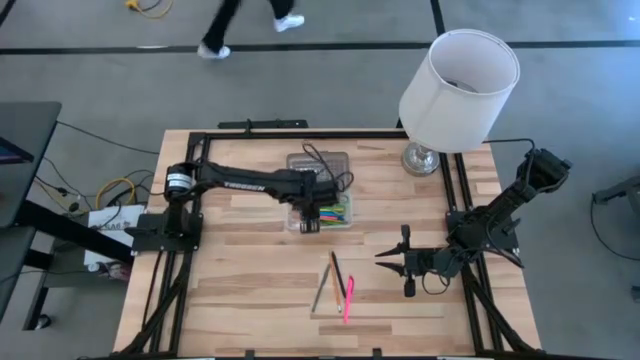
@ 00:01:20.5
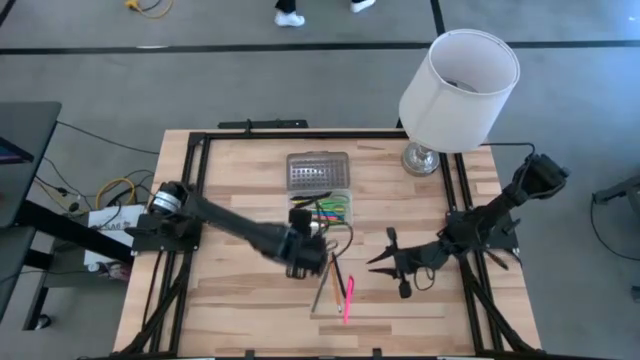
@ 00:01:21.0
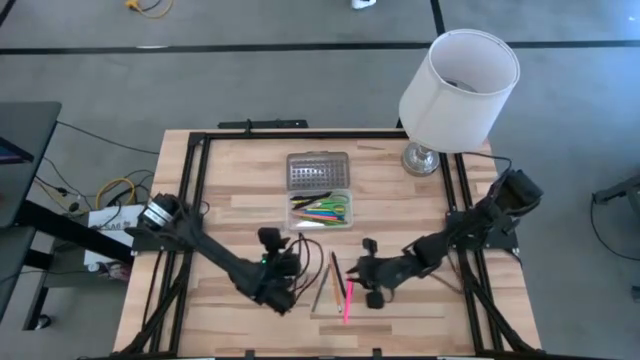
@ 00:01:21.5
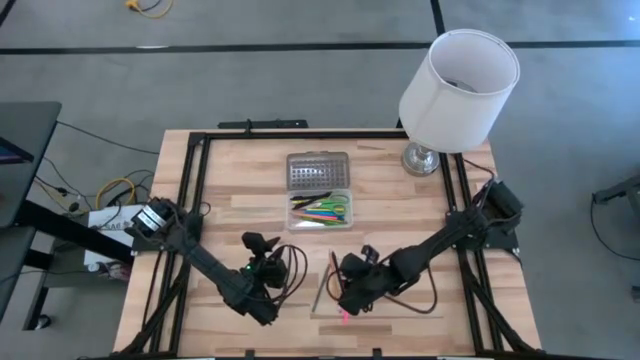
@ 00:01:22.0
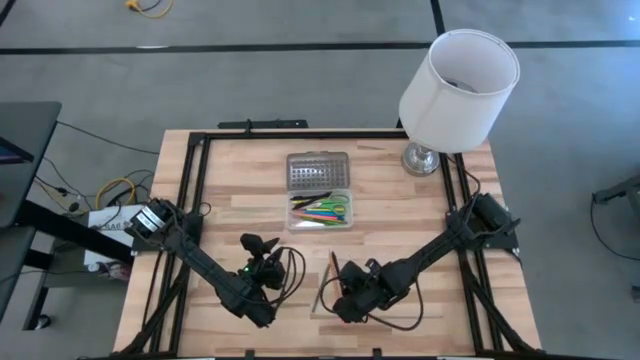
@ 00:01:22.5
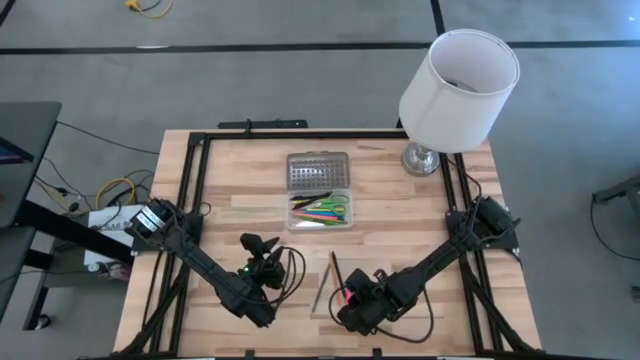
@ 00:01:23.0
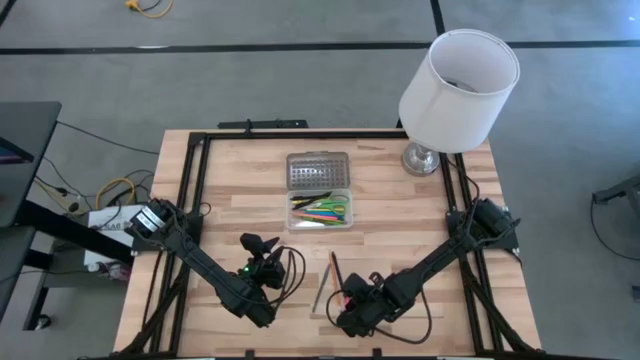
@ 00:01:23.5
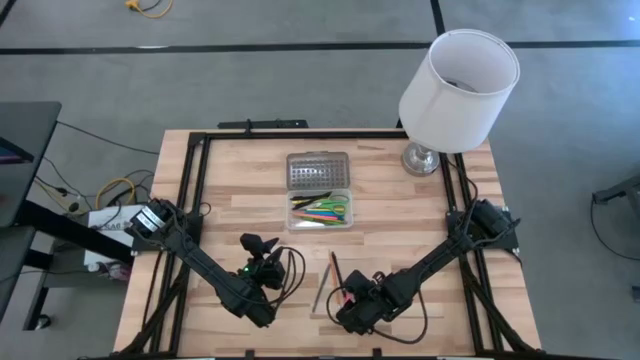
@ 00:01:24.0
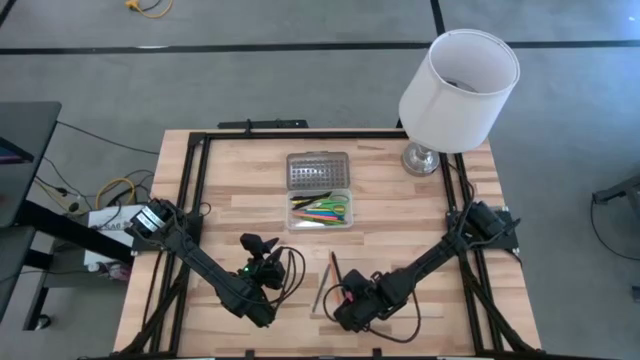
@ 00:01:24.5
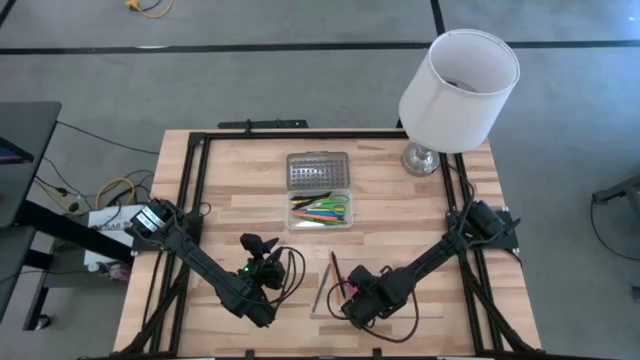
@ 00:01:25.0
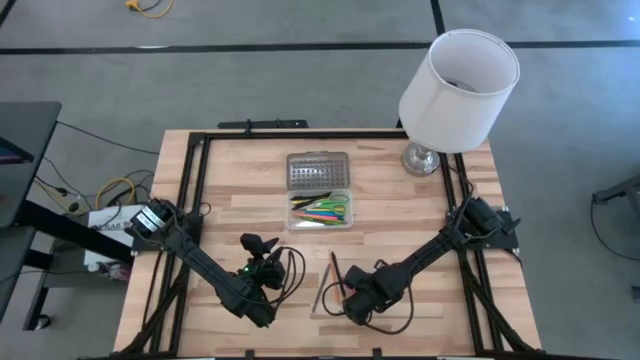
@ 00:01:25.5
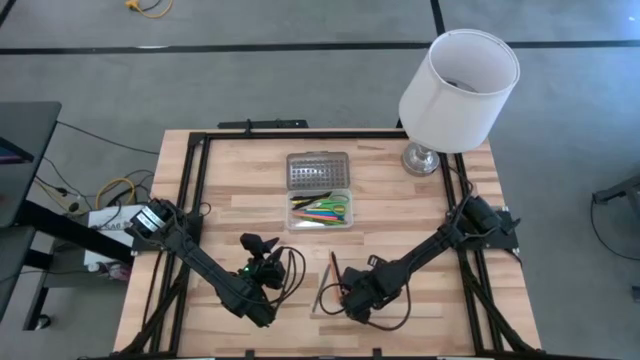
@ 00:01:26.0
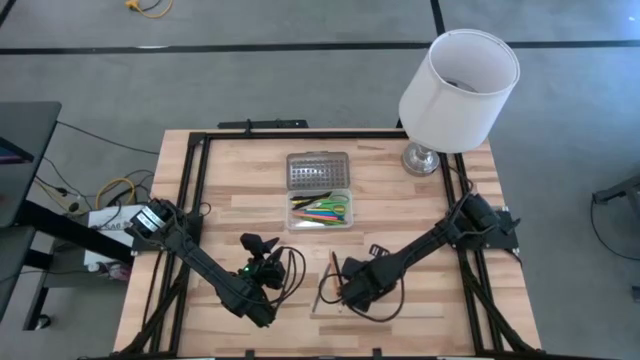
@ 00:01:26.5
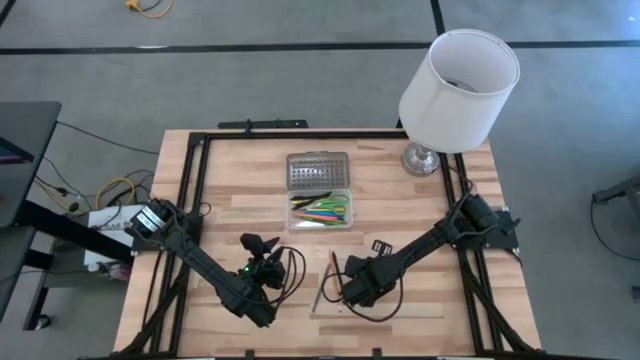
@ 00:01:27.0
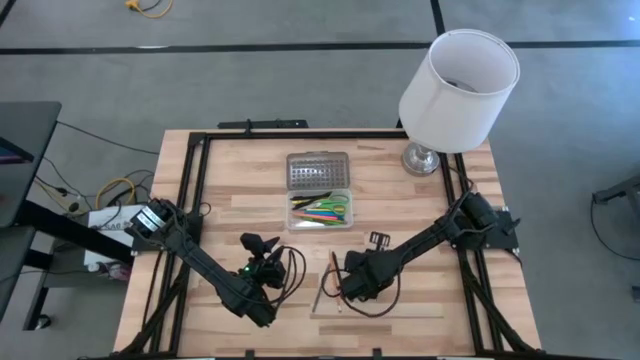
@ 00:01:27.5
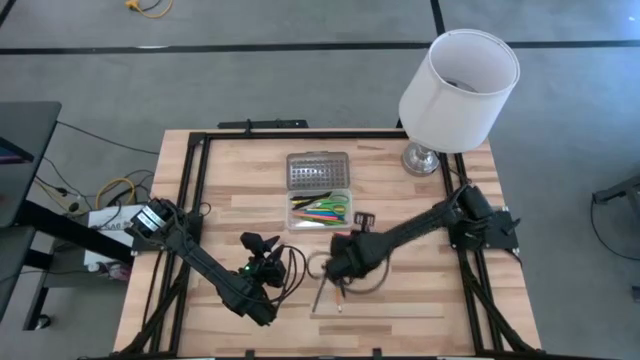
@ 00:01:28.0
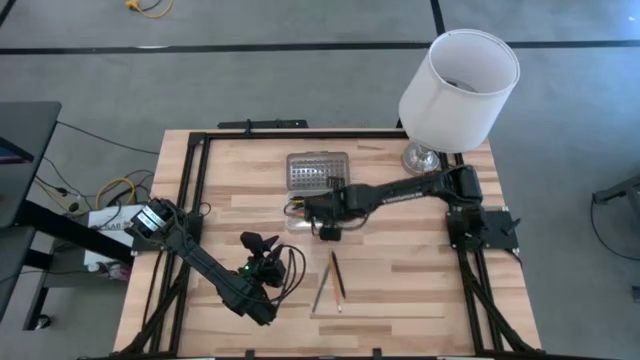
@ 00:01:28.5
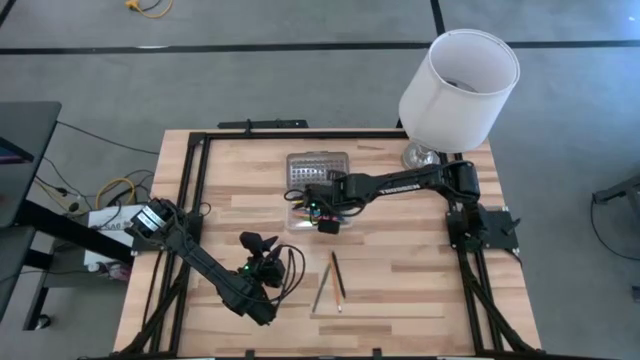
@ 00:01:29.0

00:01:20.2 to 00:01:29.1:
Task: Pick & place school supplies into a supply box
Put the pink pen into the black supply box

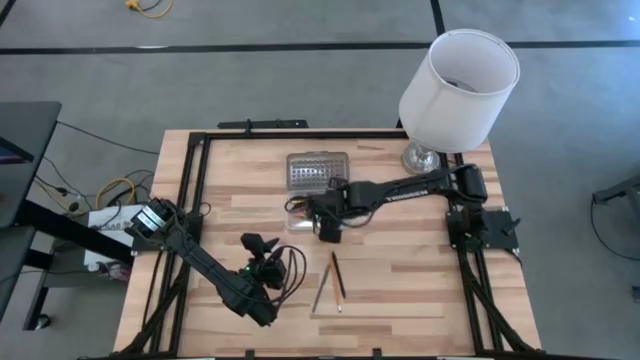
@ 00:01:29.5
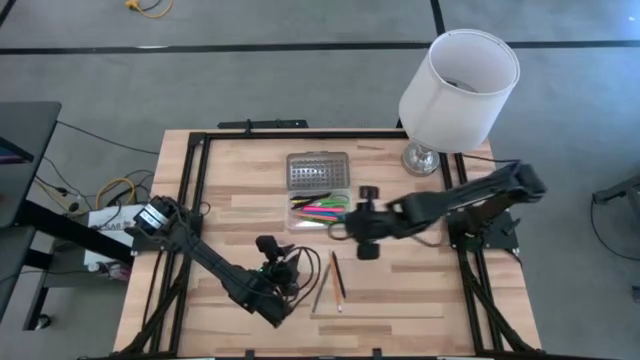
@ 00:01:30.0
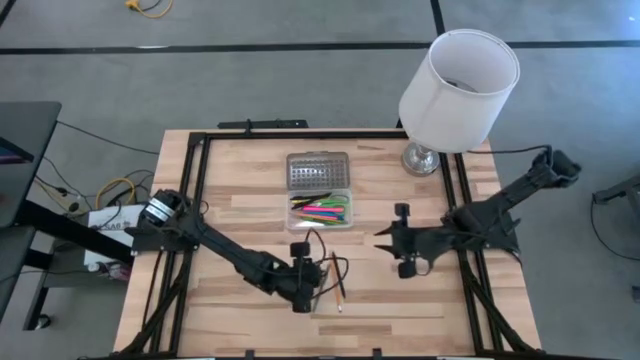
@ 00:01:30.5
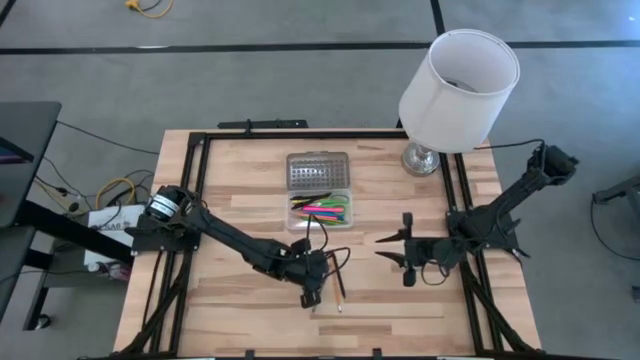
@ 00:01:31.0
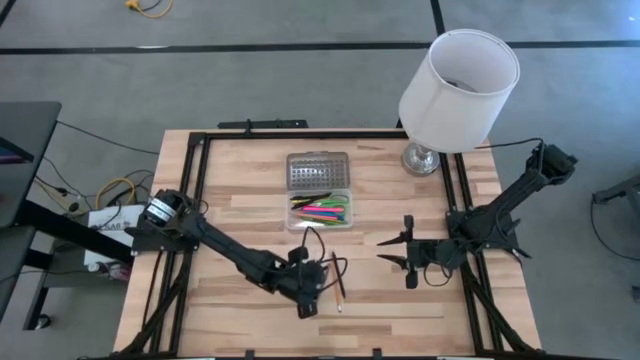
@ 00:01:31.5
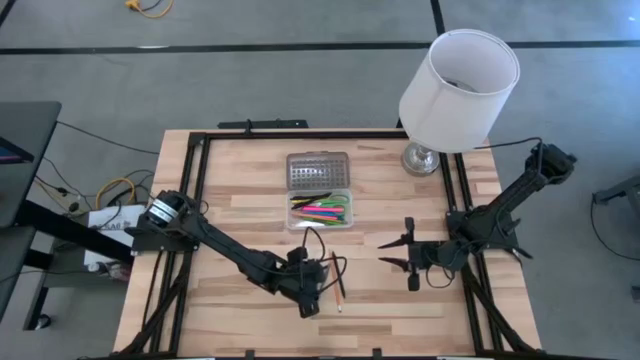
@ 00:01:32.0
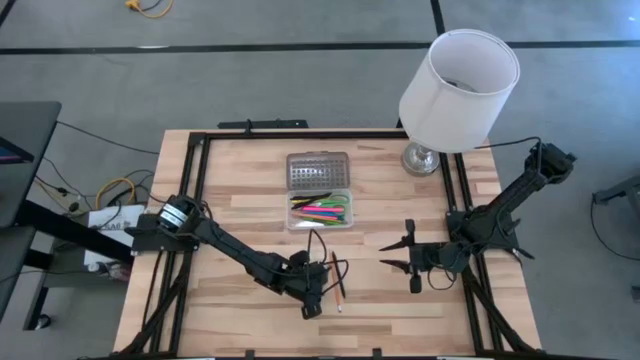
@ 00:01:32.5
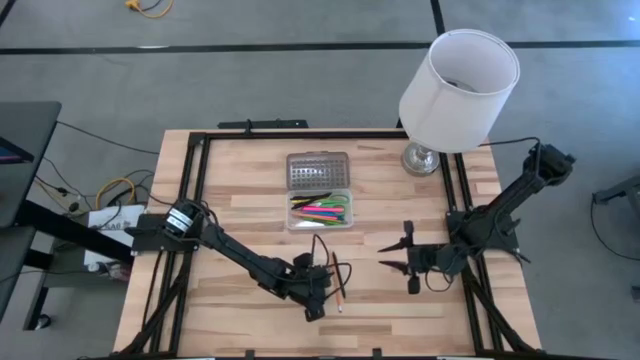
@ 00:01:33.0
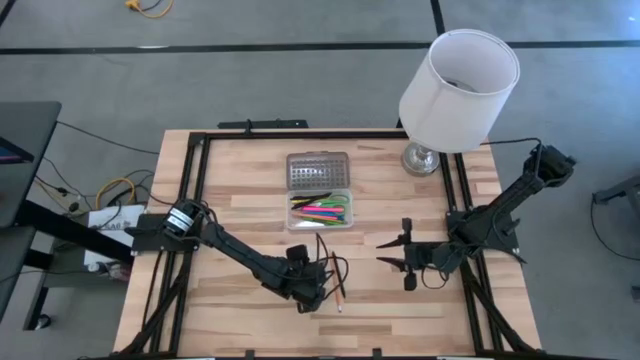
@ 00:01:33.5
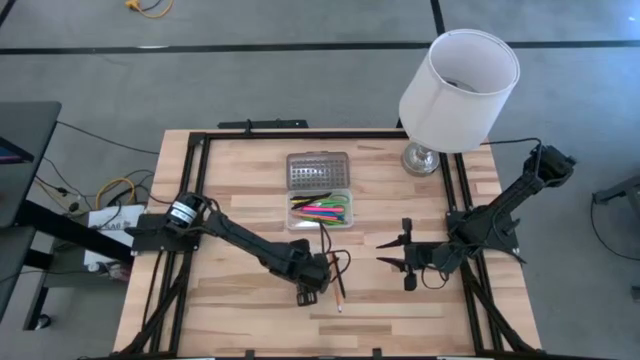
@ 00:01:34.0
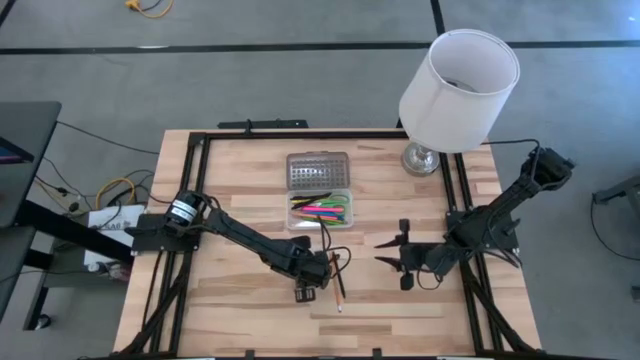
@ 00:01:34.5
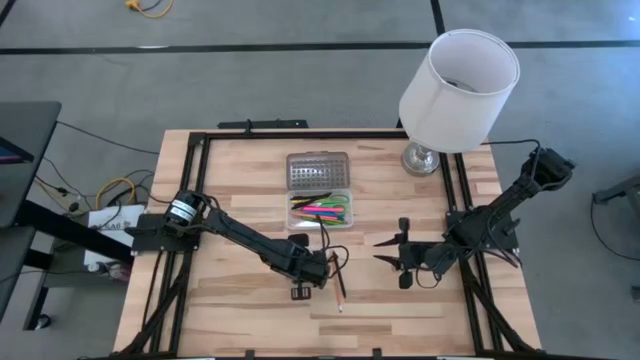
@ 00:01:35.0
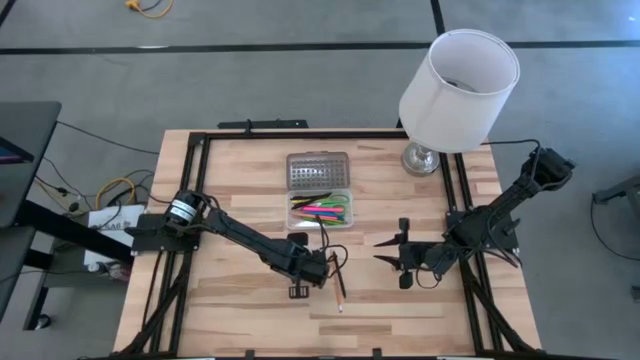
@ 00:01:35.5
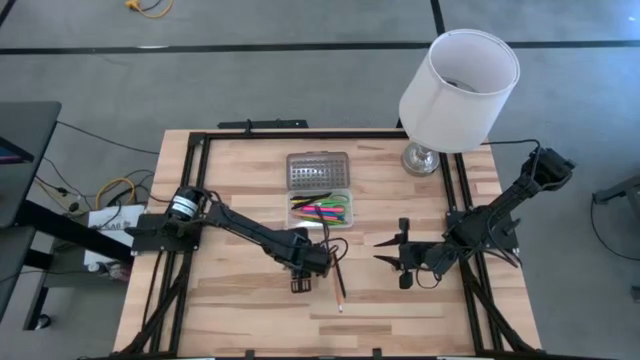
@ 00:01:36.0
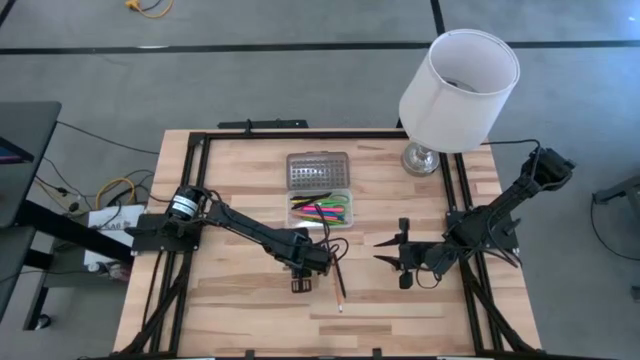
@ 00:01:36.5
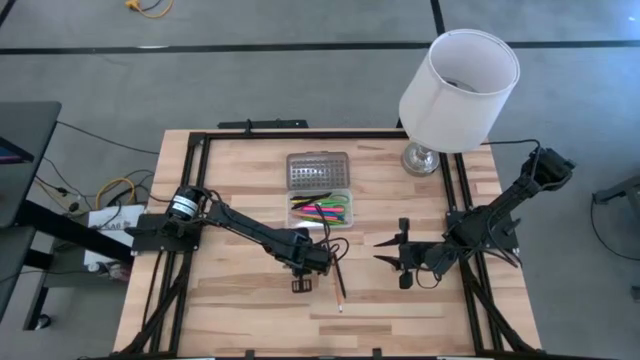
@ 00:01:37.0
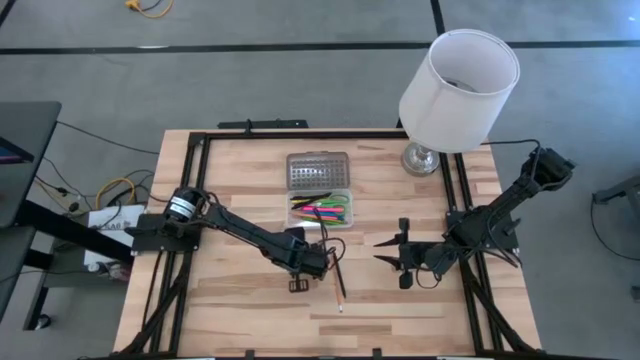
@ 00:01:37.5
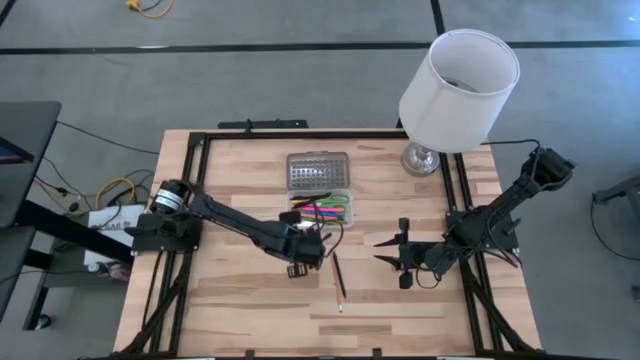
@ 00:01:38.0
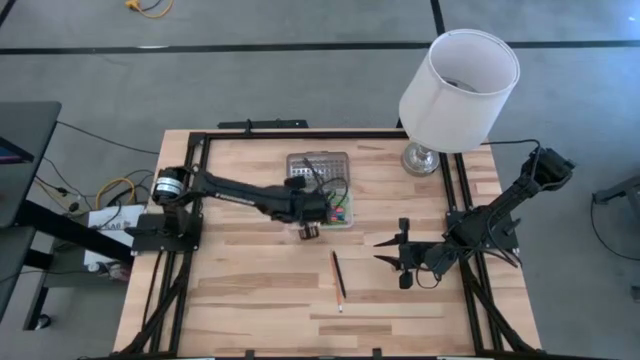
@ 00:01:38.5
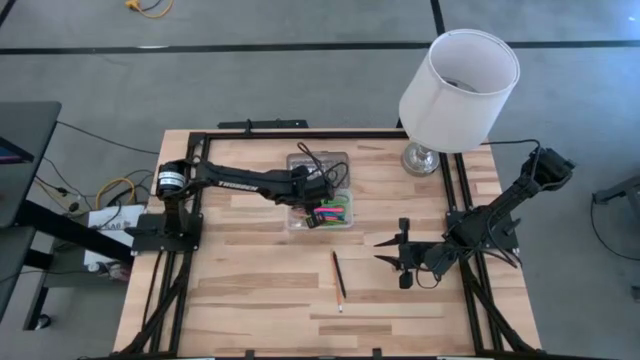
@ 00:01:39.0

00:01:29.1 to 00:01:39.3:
Put the gray pen into the black supply box

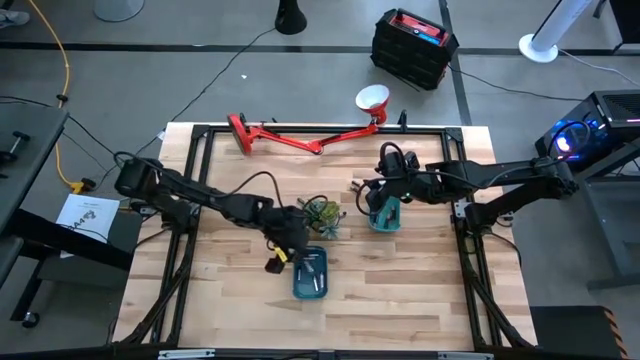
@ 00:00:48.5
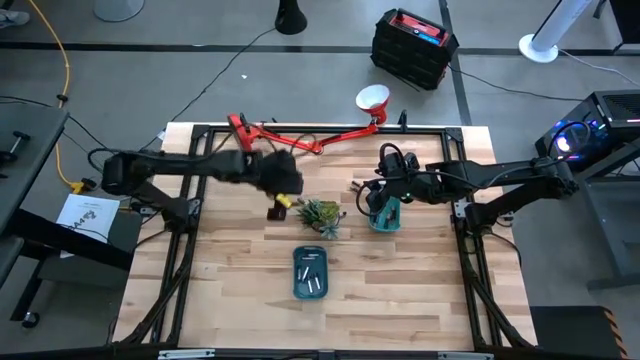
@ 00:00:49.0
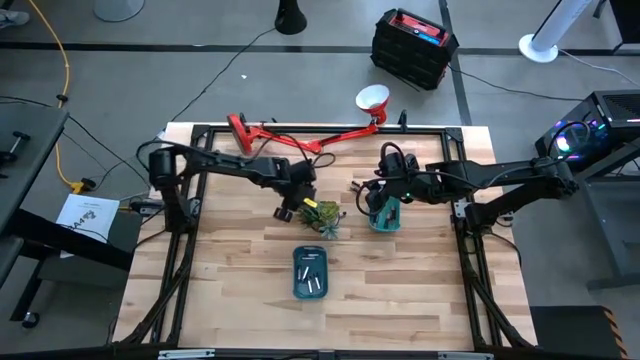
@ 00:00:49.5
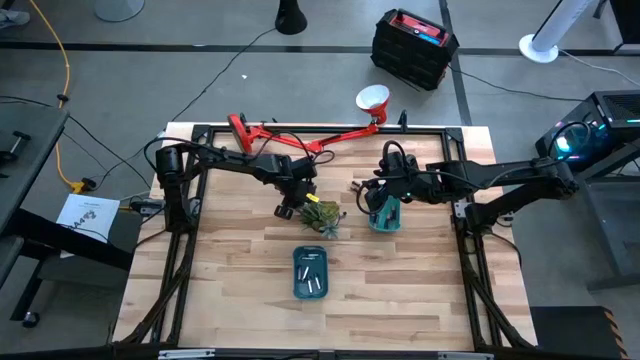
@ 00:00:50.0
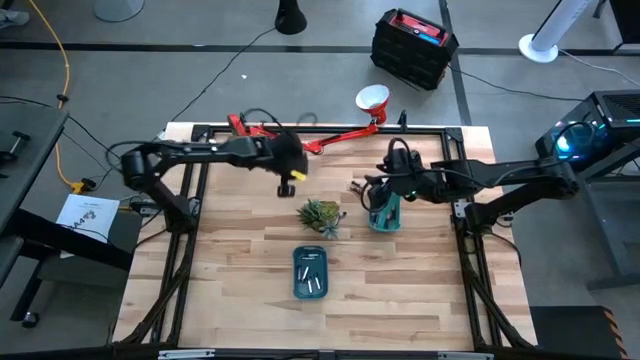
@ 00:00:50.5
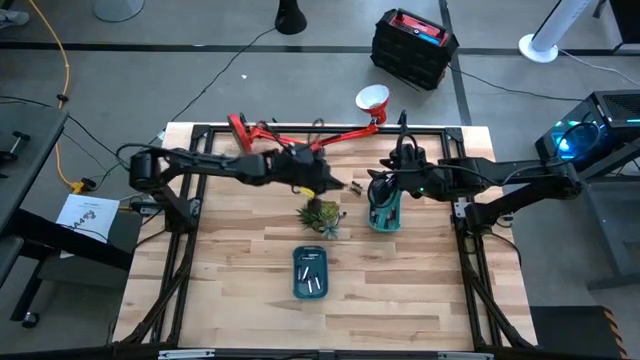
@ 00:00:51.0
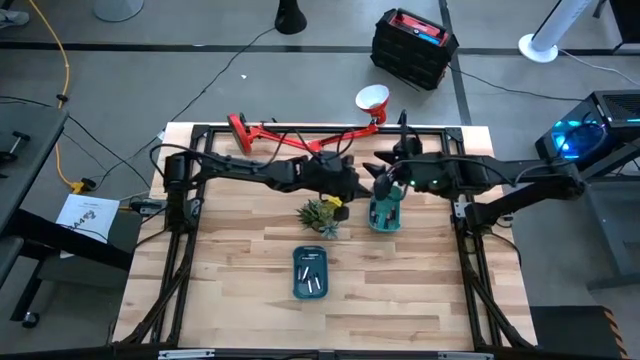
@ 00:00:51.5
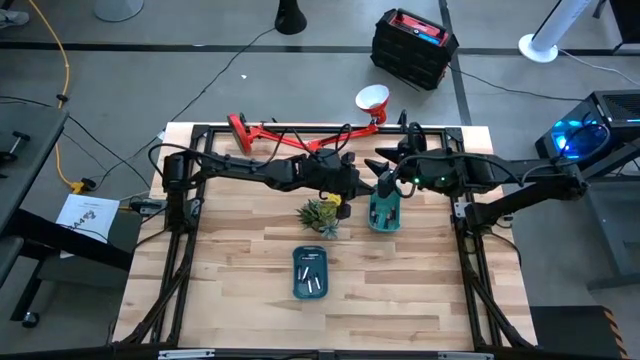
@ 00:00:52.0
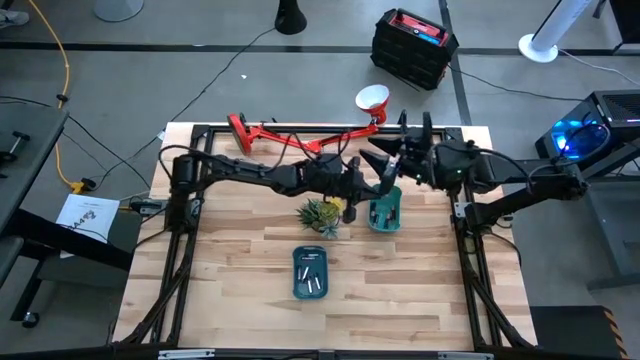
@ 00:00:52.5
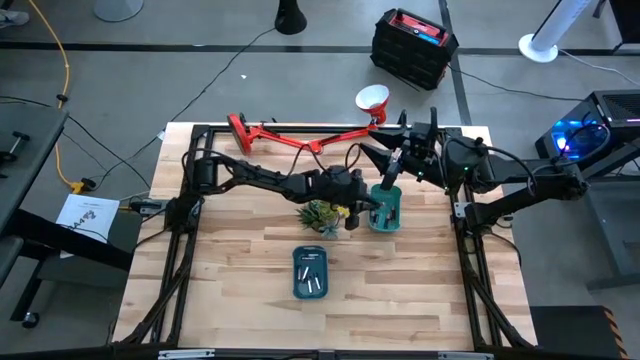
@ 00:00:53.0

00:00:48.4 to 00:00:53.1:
Task: Sort batteries
Put the black battery into the green bin
